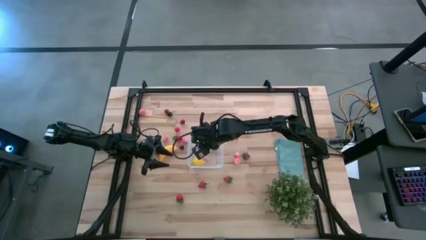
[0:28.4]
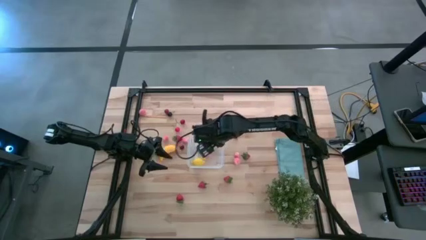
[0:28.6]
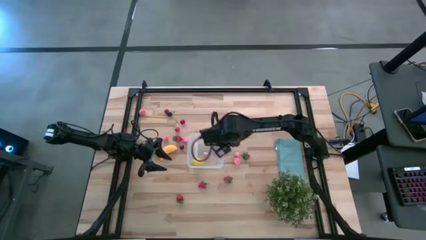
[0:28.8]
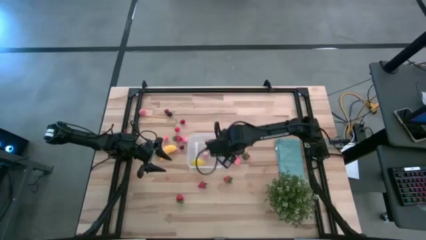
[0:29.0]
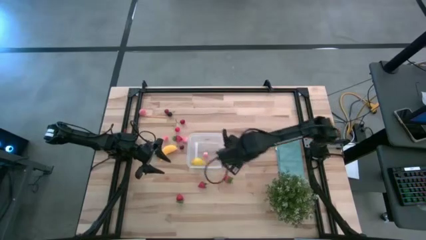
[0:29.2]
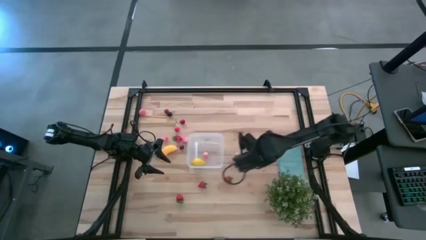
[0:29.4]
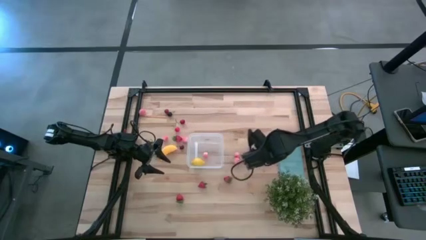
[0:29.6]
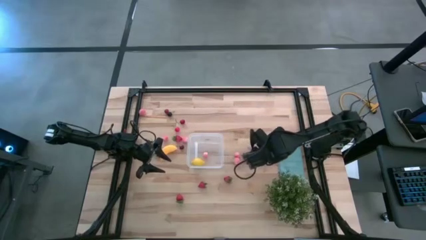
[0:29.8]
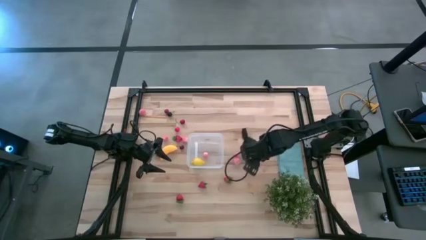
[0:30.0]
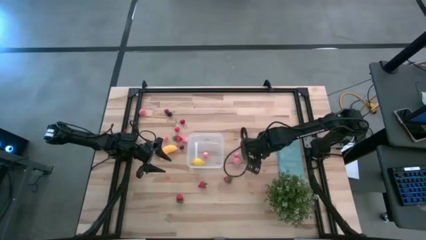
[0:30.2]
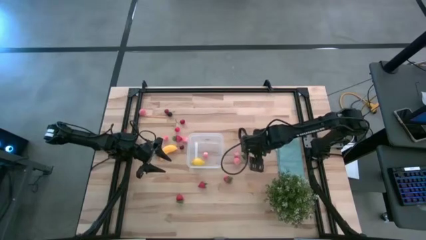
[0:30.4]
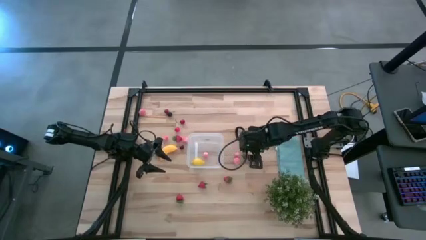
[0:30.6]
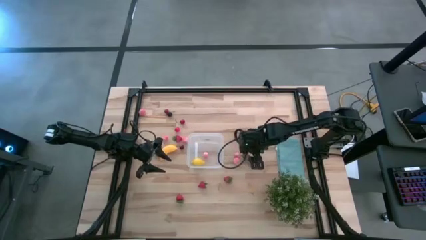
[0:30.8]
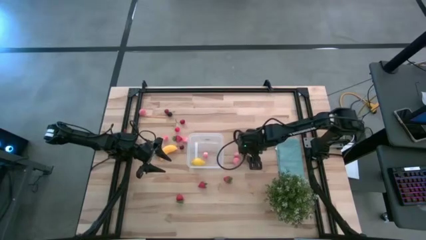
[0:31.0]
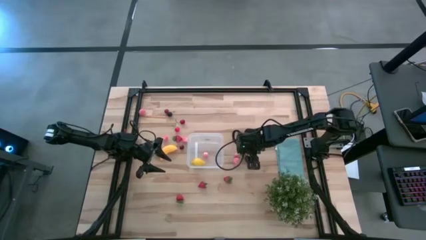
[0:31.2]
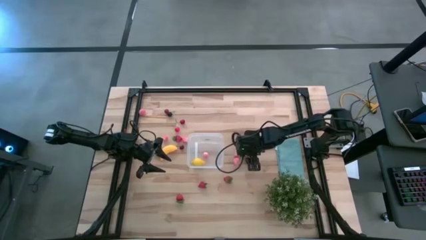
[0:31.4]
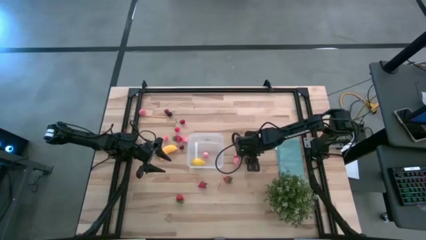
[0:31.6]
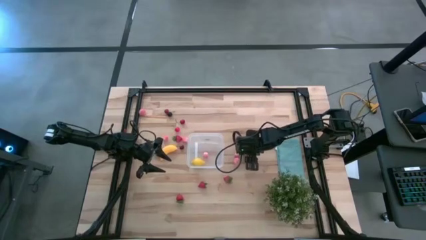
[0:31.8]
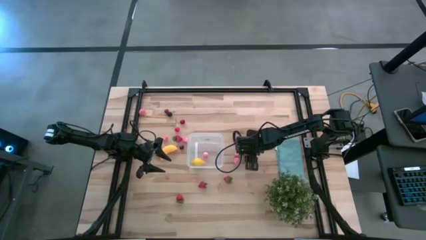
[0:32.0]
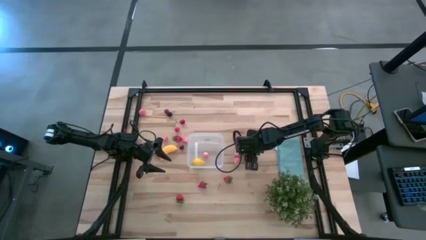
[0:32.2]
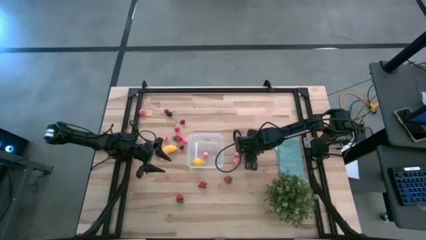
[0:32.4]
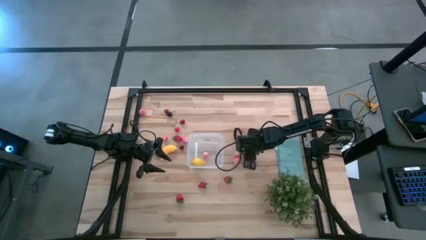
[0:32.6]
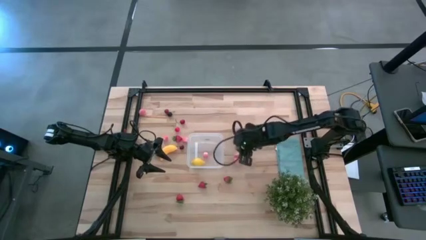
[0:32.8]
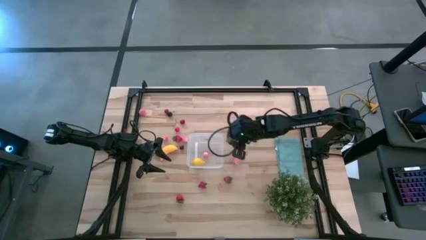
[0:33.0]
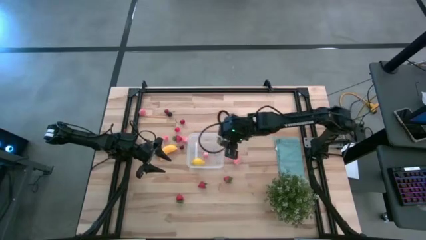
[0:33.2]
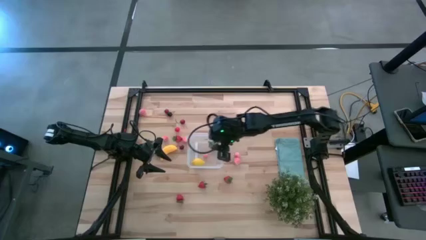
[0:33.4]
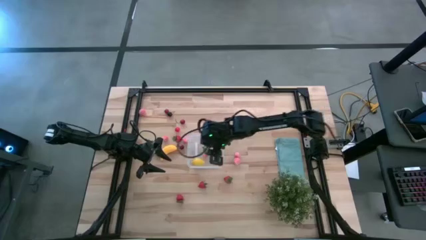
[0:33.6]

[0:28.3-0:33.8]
Task: Pick and placing Produce into tupperware
Put the strawberry into the transparent bin

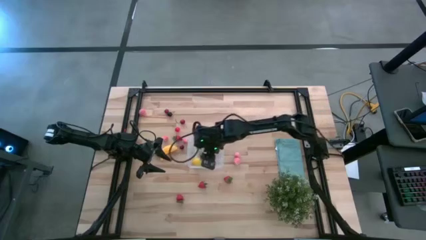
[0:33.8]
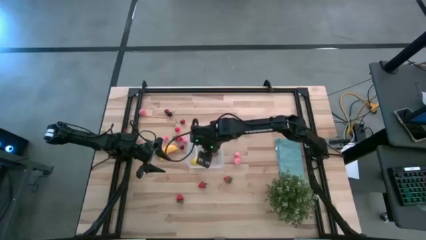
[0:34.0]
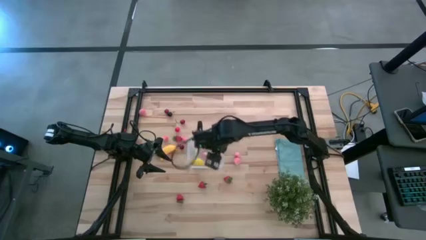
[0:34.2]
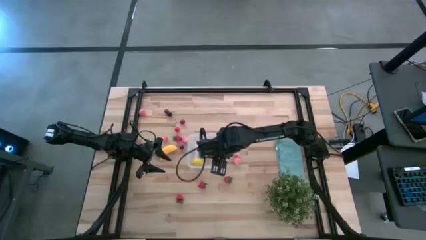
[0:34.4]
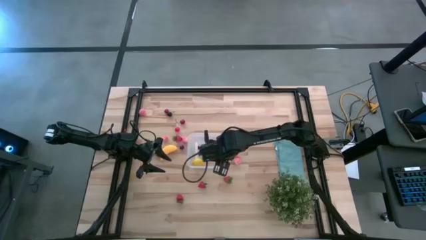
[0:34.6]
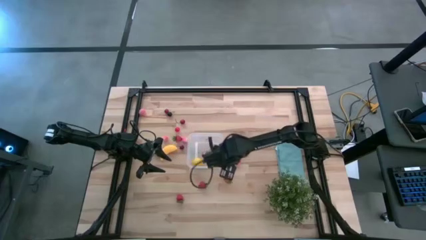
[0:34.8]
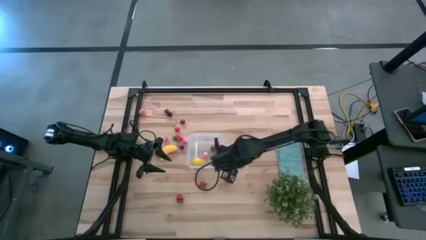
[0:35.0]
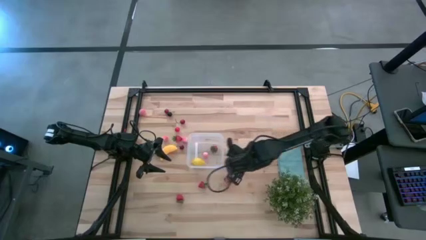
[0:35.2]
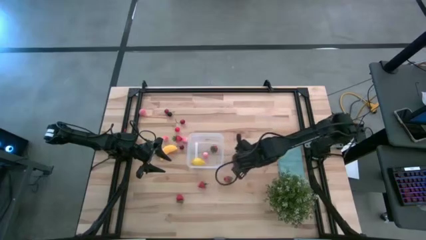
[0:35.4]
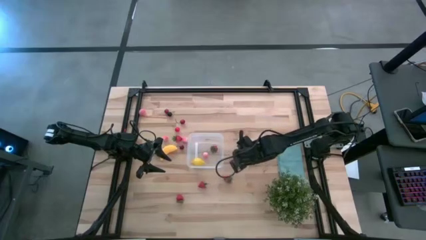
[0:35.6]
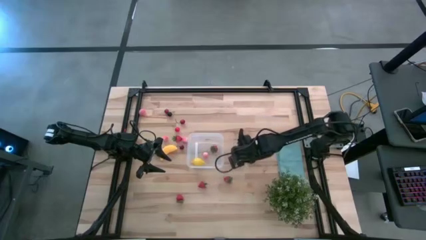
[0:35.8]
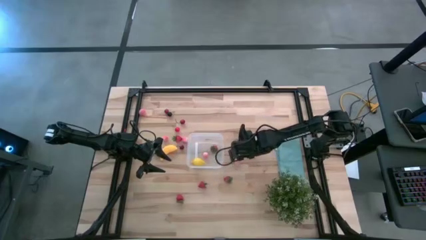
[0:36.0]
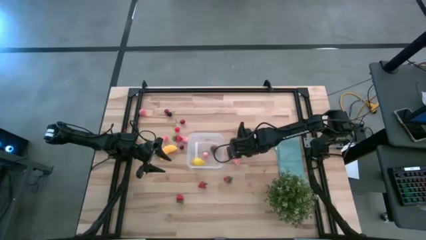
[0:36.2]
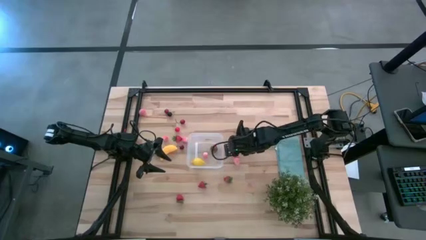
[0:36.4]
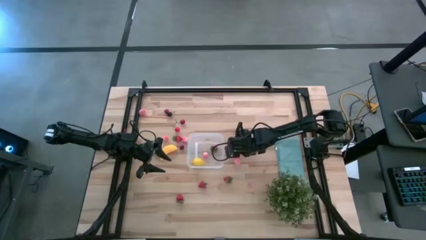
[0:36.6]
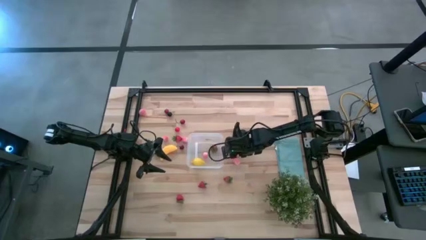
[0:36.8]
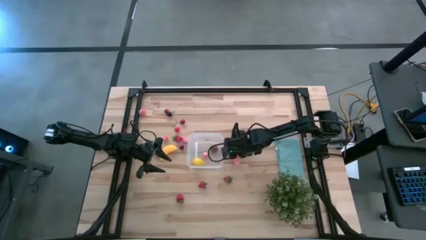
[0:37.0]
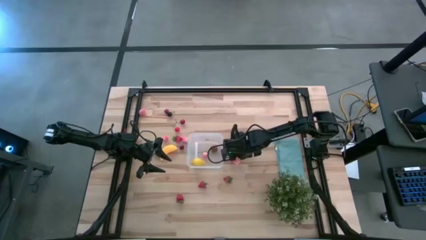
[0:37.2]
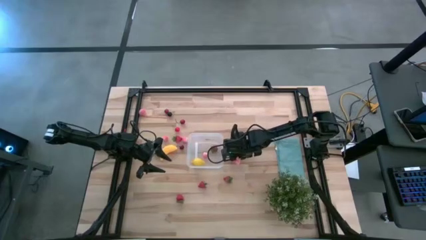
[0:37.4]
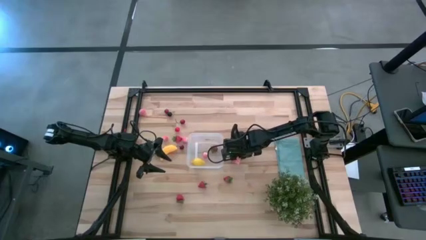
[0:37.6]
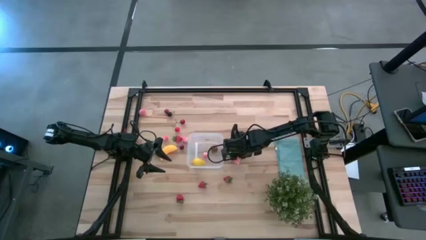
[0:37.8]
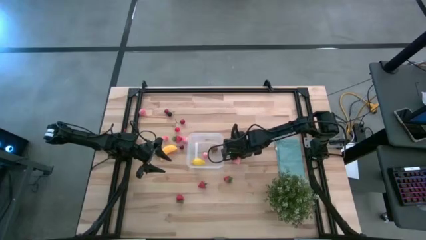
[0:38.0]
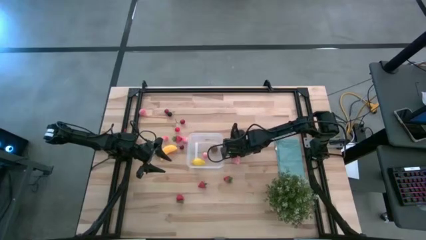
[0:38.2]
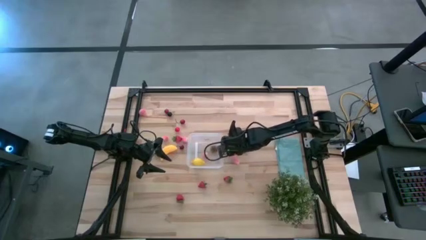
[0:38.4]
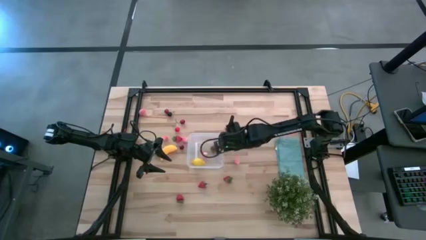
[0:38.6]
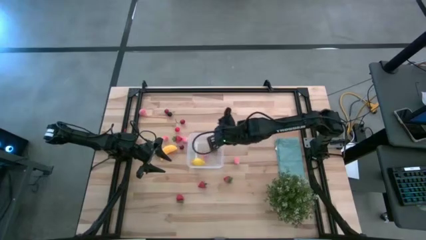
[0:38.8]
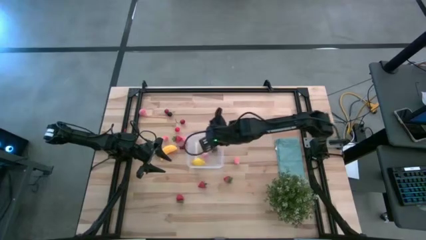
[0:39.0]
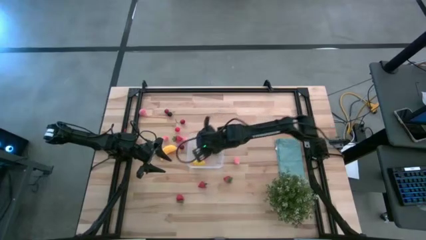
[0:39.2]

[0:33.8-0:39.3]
Put the peach into the transparent bin
